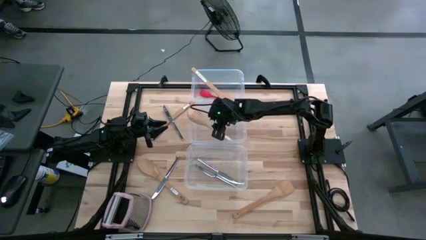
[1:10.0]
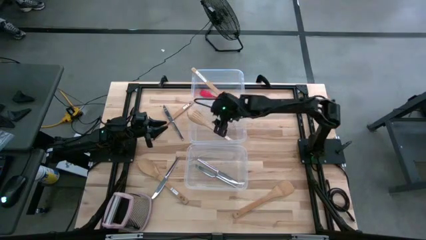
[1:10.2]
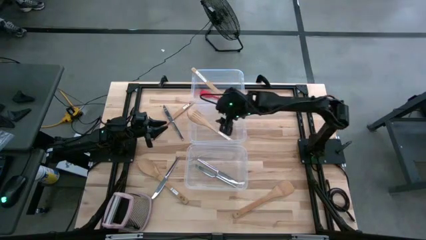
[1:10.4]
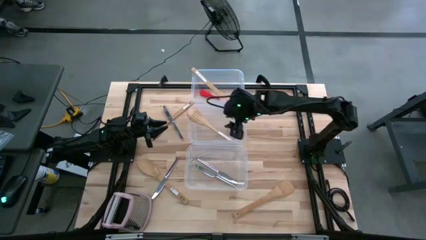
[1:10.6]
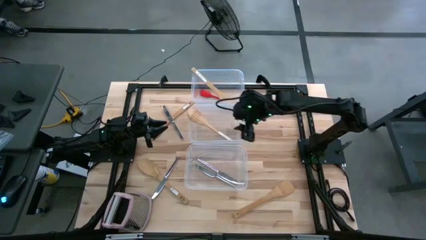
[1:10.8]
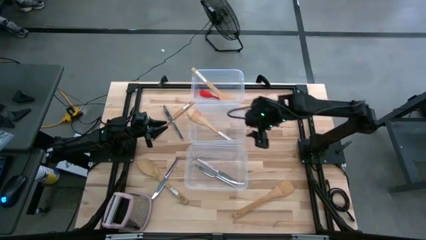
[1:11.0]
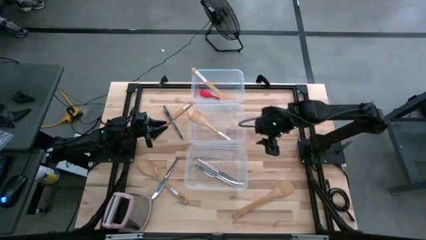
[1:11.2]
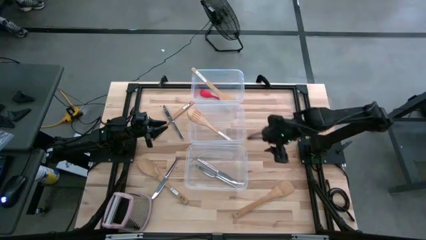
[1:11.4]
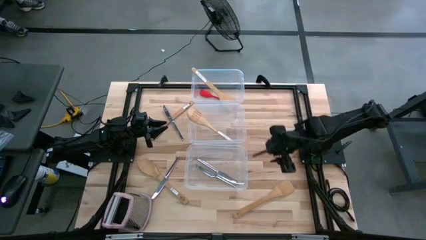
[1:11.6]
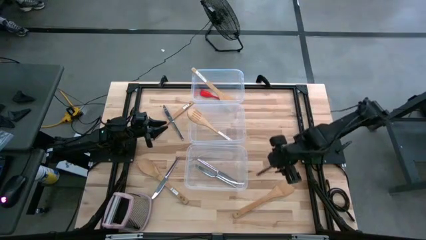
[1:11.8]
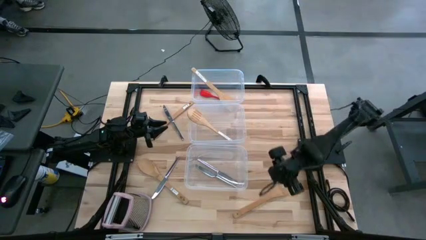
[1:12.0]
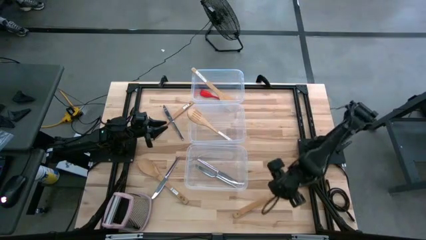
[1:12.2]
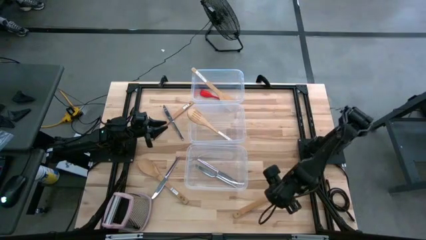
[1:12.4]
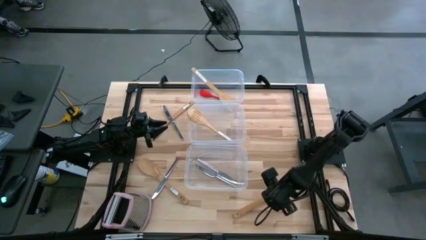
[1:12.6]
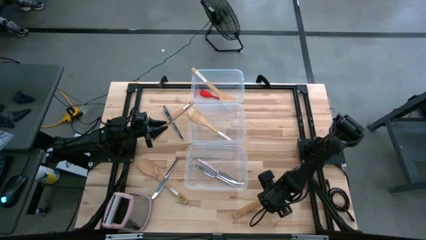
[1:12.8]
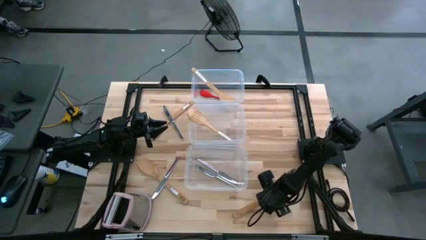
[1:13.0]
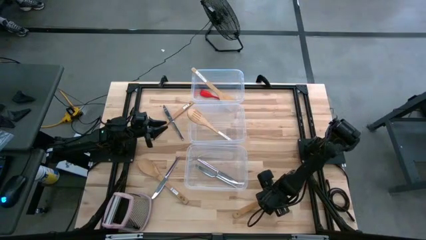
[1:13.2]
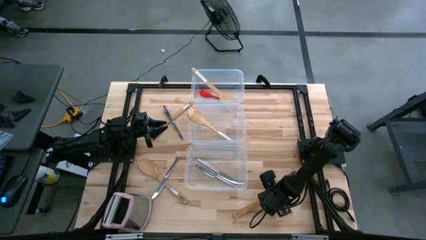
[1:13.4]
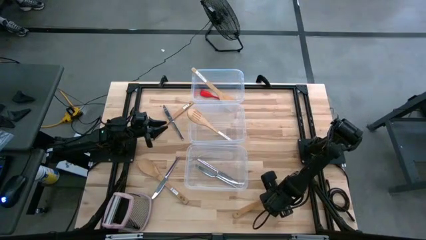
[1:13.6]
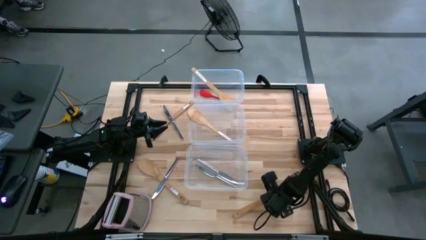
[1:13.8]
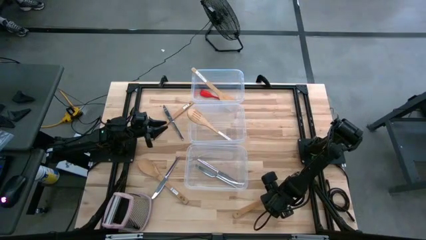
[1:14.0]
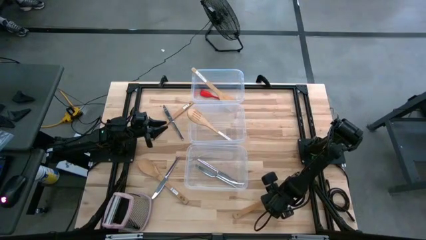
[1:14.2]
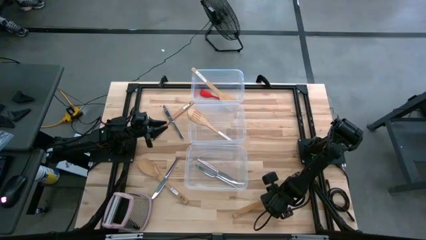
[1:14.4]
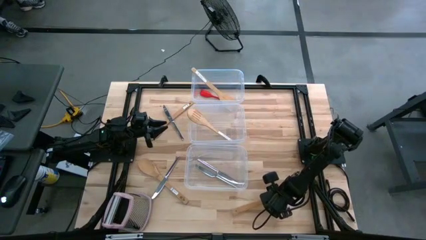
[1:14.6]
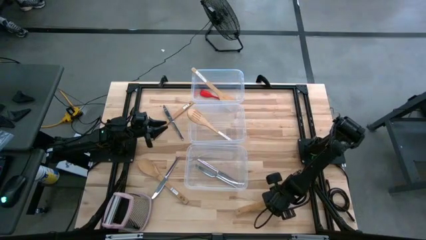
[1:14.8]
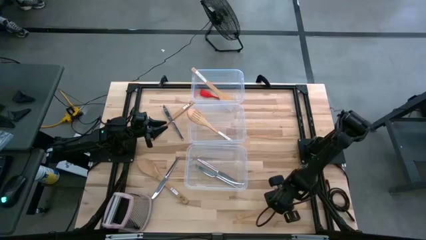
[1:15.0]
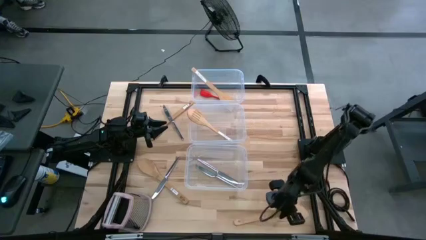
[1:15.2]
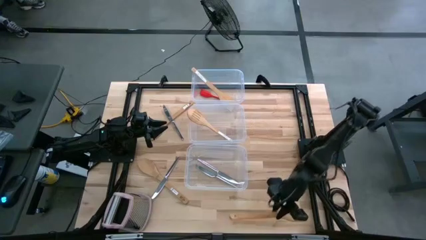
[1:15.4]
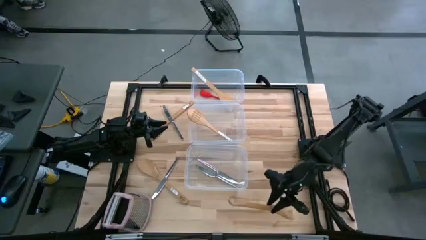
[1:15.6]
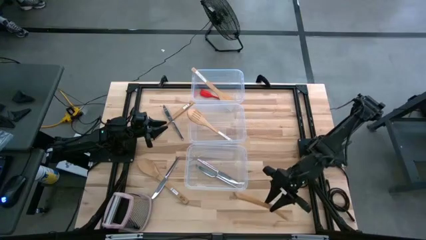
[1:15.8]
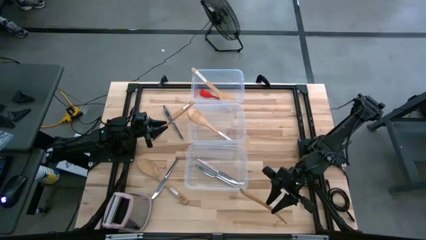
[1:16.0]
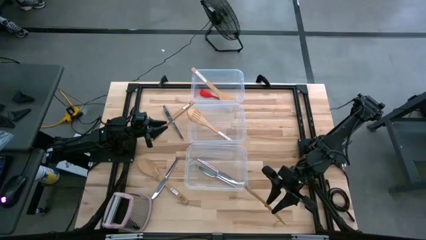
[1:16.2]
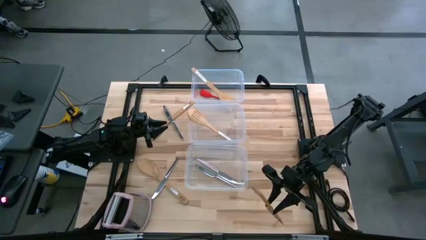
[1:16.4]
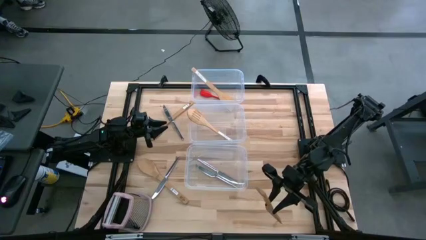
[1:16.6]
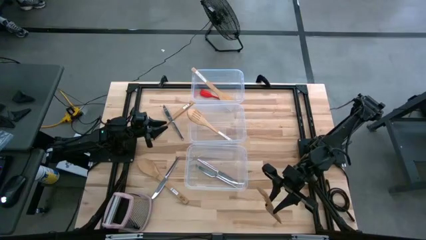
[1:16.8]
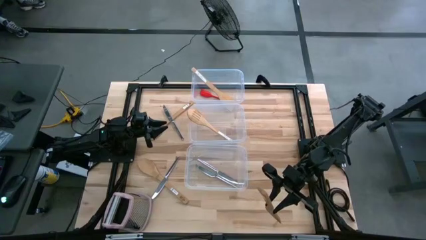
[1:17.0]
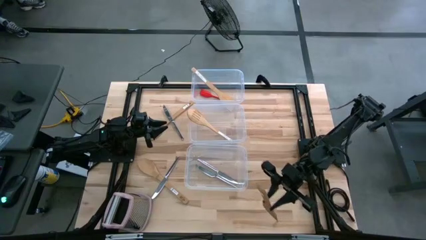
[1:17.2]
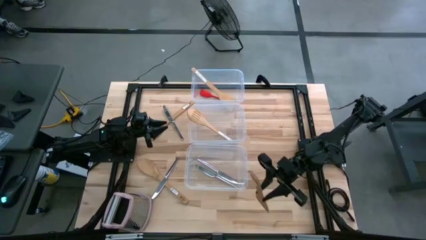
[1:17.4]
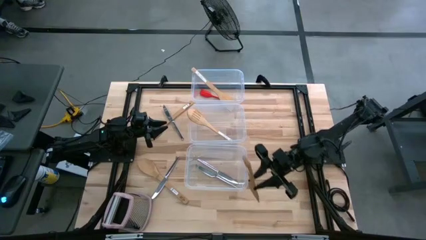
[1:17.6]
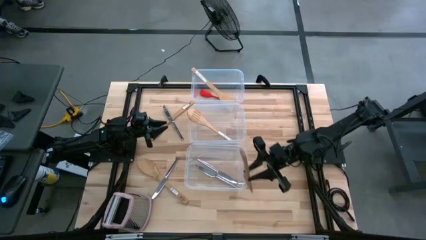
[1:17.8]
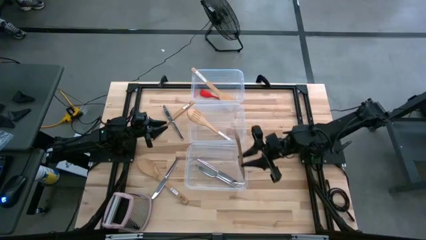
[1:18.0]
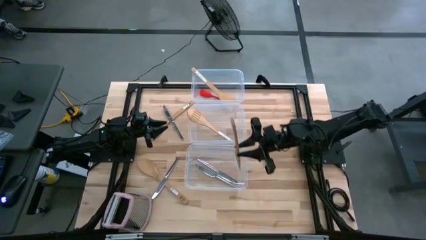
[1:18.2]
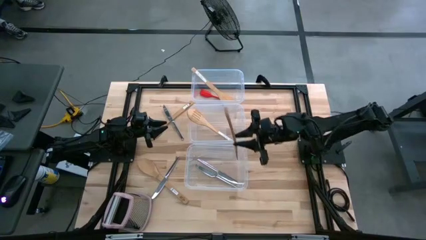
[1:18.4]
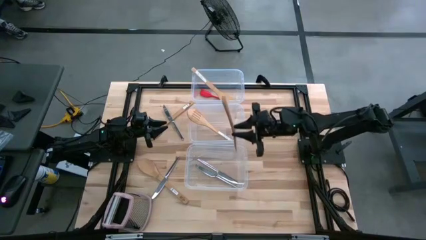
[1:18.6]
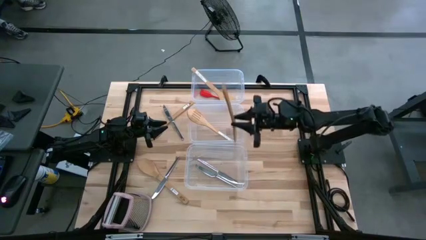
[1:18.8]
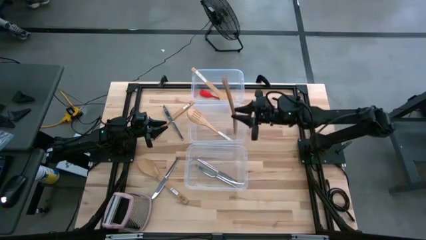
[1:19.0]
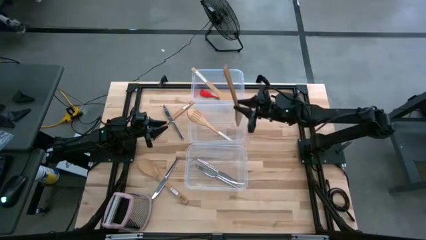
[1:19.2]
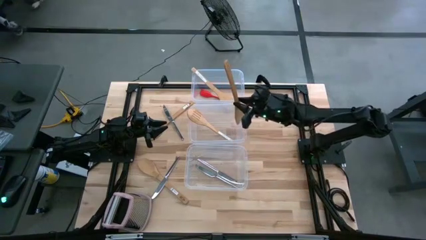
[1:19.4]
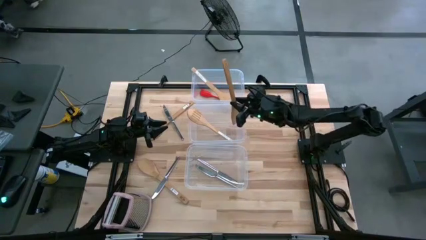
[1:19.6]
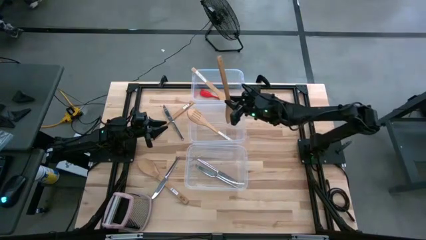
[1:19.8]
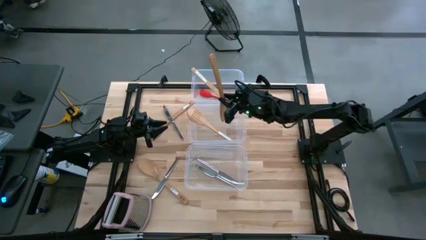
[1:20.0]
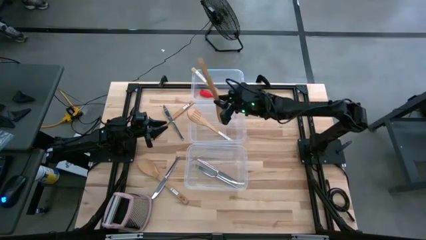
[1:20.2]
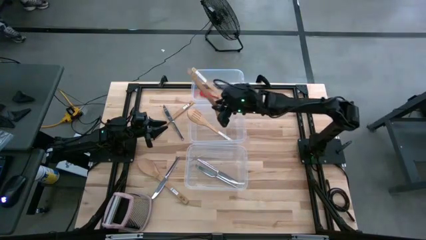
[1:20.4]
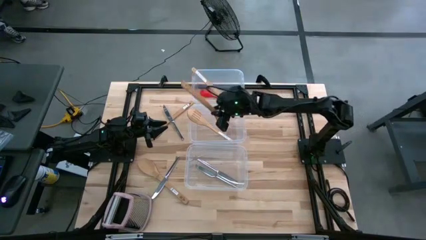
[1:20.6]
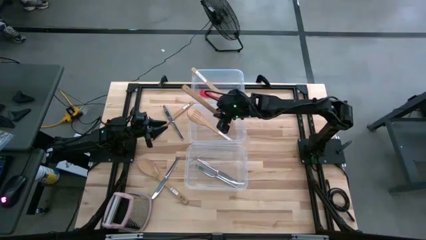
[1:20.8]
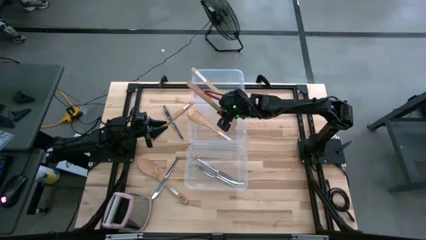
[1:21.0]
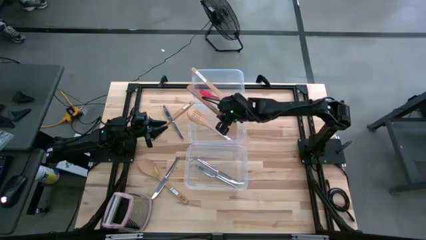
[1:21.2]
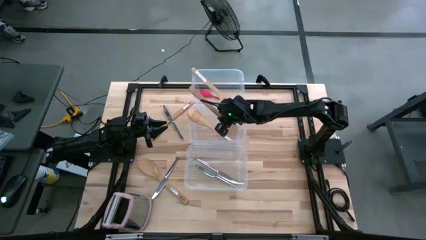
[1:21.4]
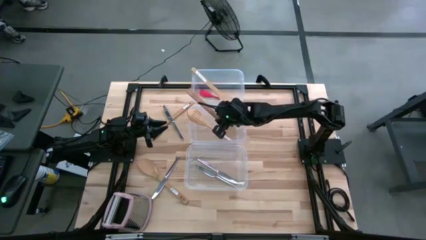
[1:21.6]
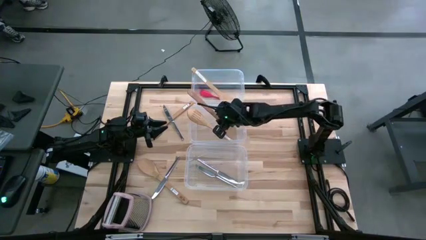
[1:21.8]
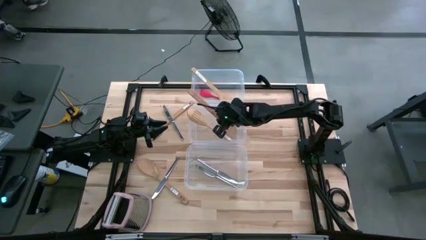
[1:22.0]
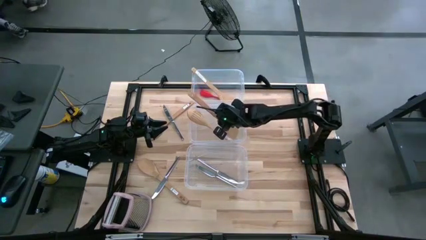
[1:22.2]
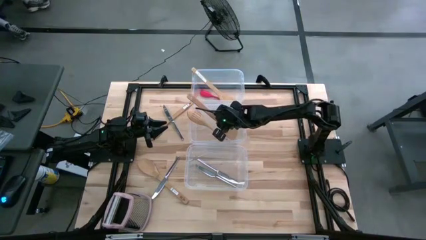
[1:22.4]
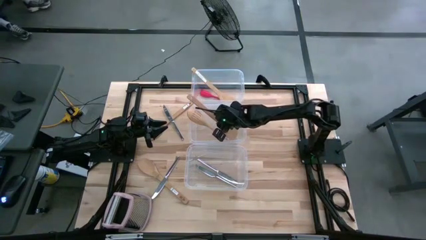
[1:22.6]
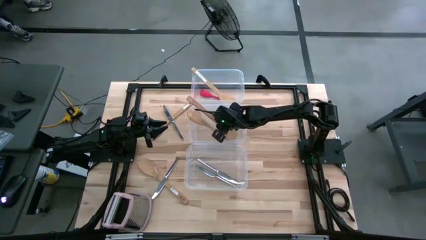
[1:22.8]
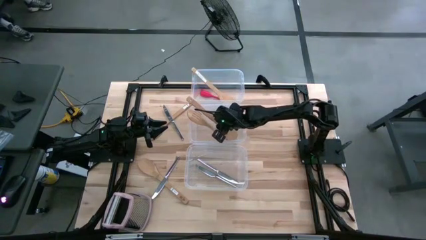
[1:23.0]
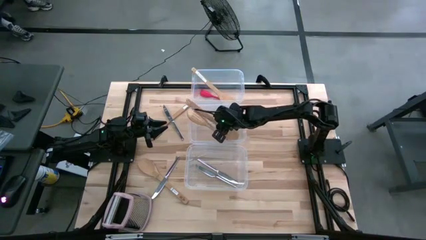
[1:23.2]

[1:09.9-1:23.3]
Task: Pick & Place Kitchen Items
Put the brown spatula into the middle transparent bin

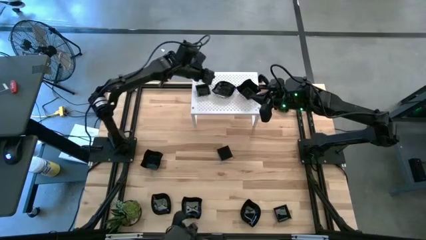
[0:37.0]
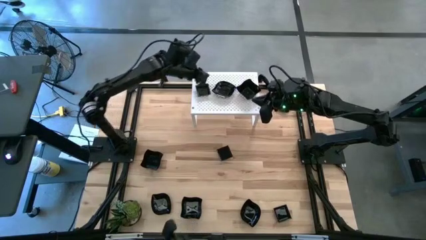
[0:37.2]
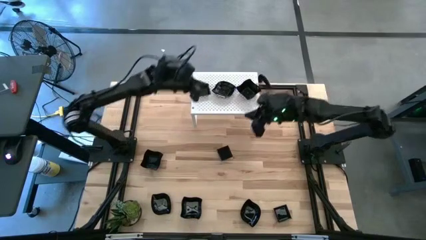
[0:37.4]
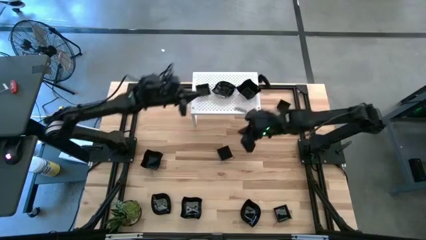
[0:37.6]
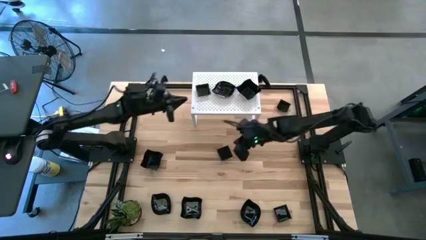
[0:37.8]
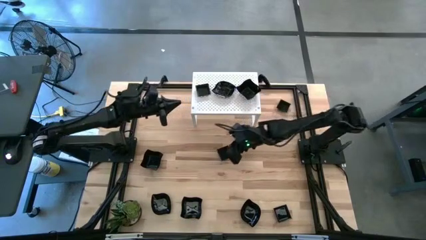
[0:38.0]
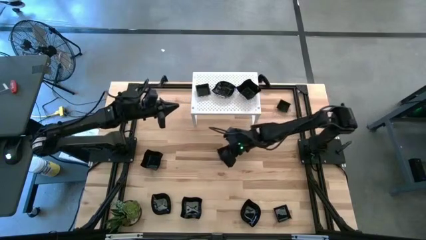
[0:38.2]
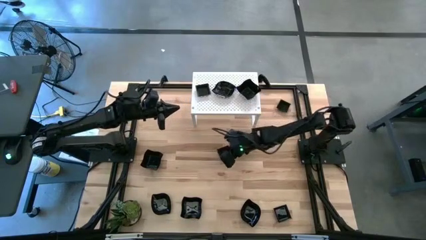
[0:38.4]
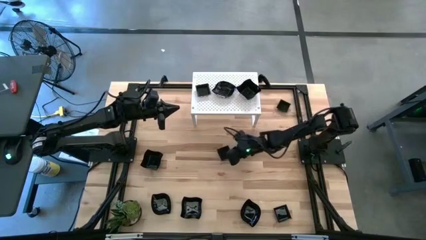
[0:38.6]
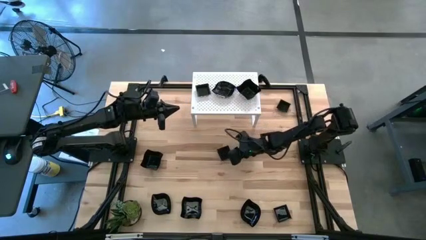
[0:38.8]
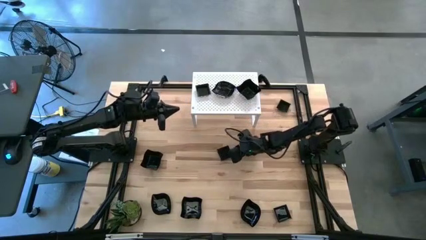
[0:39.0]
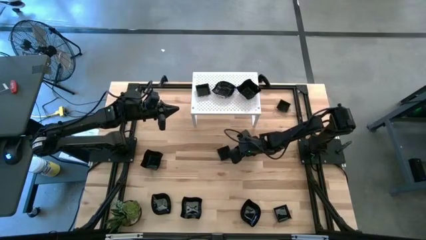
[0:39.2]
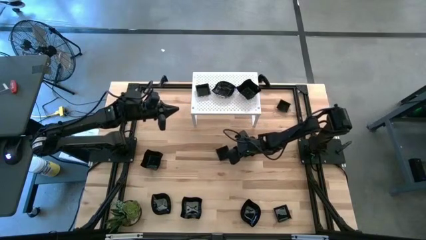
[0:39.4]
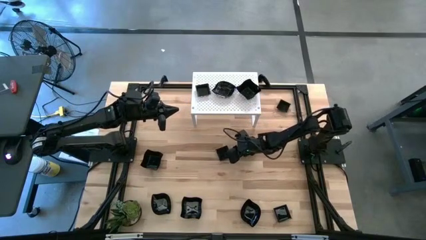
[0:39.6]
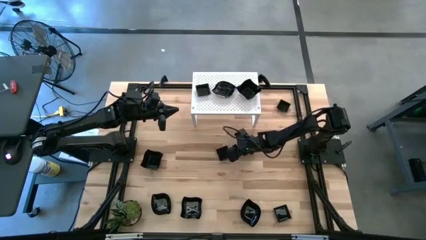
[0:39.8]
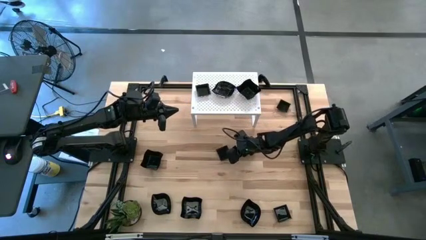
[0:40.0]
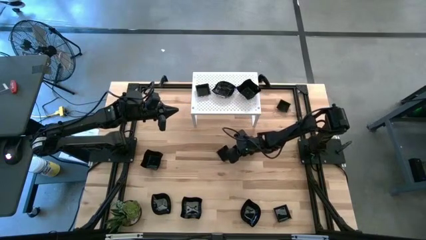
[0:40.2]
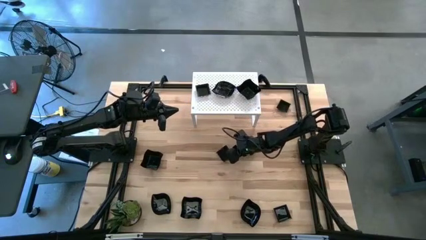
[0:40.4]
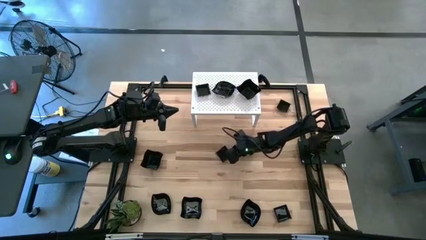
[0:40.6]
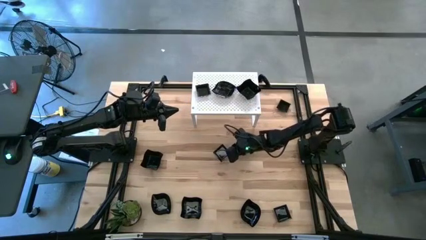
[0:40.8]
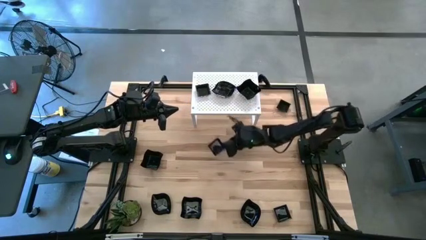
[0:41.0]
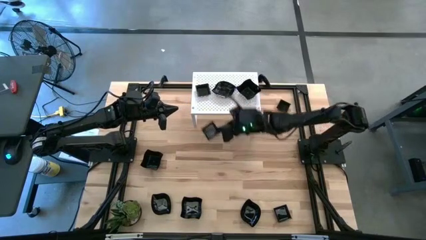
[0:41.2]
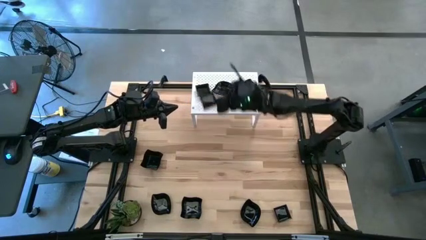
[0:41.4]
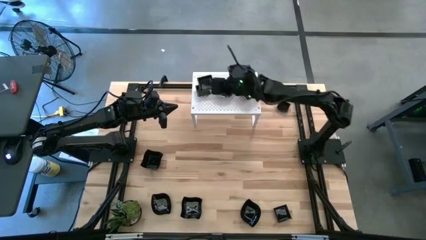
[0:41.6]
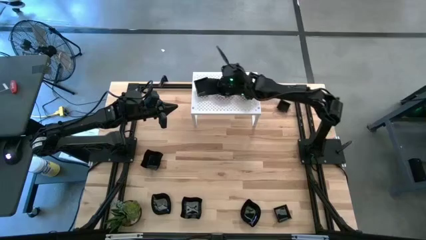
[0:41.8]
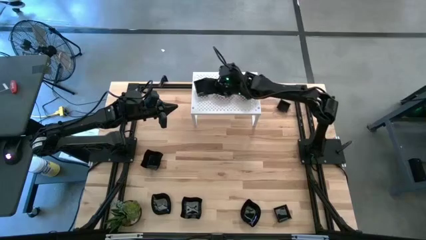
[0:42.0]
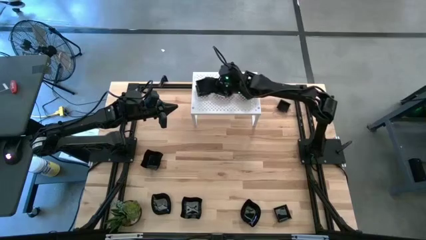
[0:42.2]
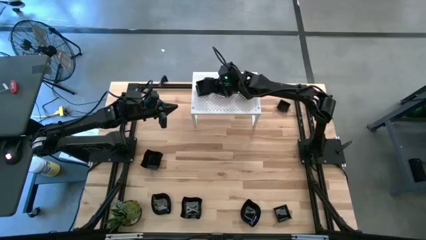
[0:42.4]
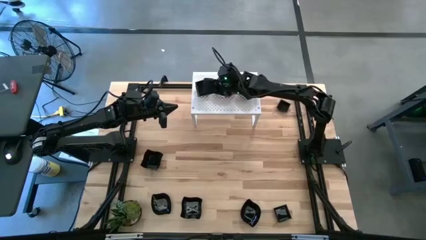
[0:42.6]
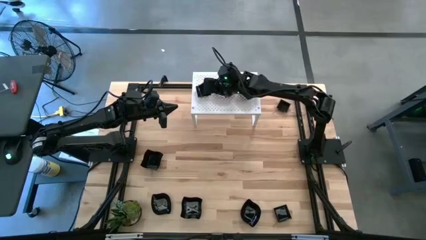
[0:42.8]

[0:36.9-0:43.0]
Task: Pick & Place Mini shaped plates
Stack the black square plate on top of the black square plate on the shelf
